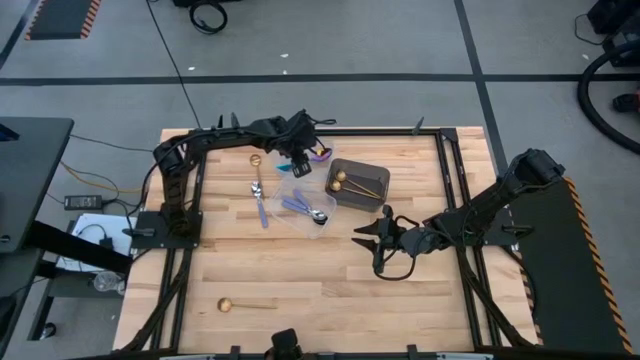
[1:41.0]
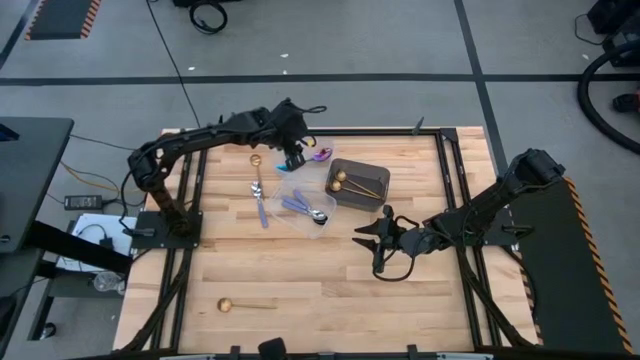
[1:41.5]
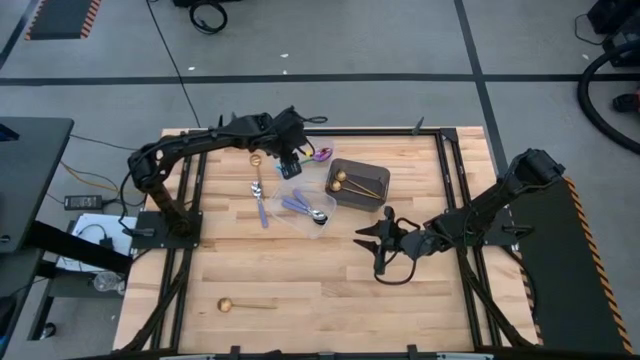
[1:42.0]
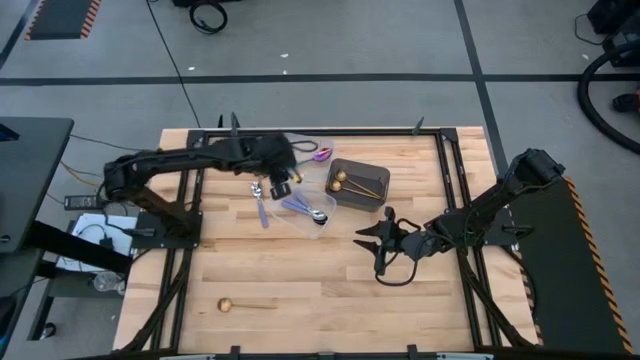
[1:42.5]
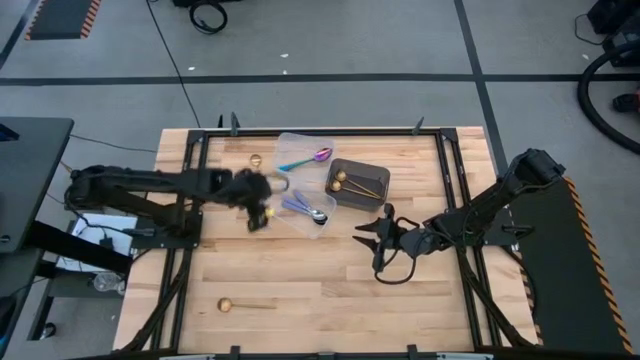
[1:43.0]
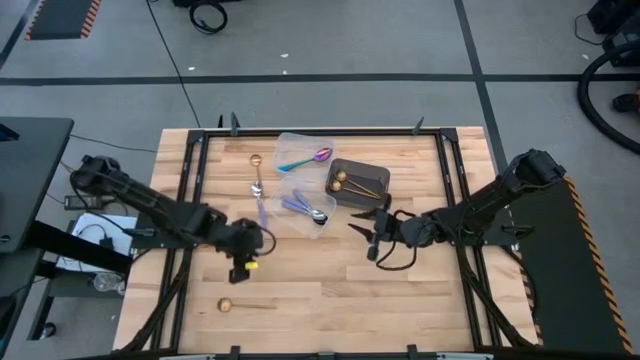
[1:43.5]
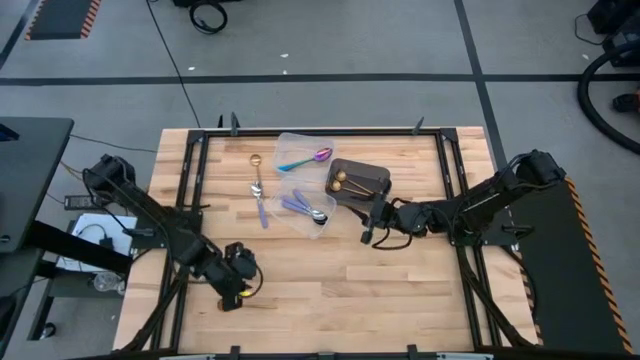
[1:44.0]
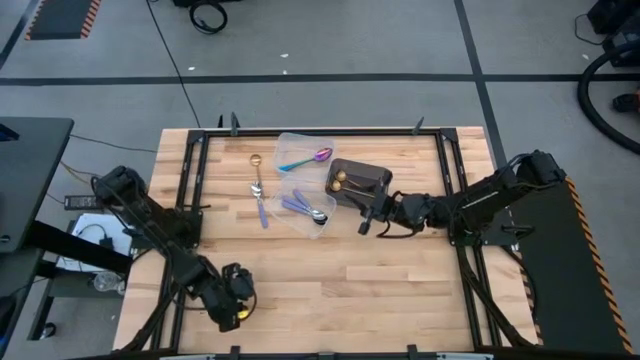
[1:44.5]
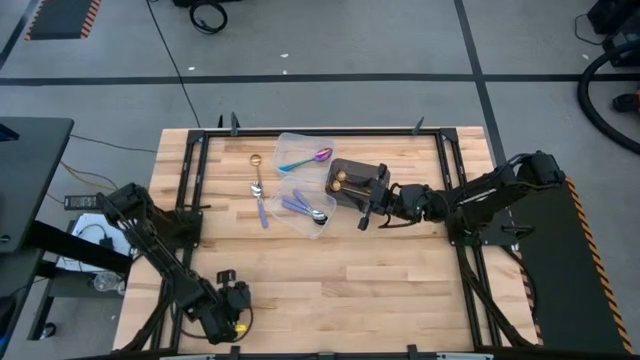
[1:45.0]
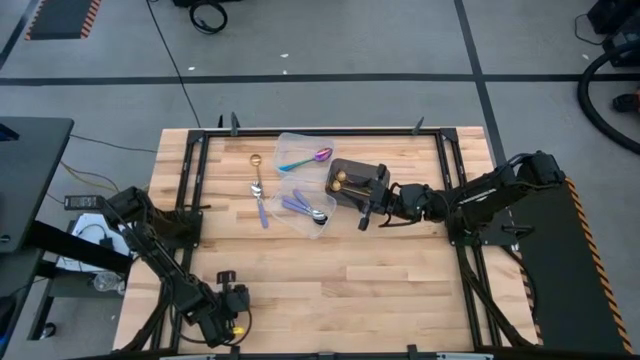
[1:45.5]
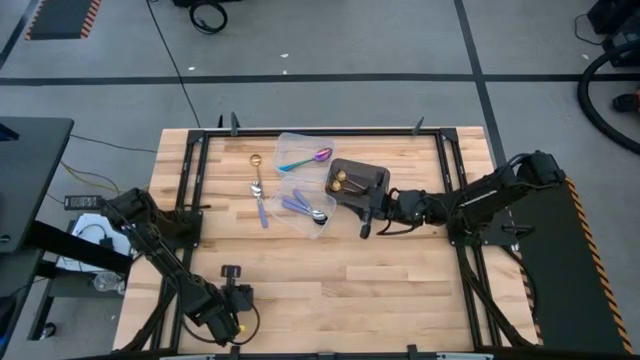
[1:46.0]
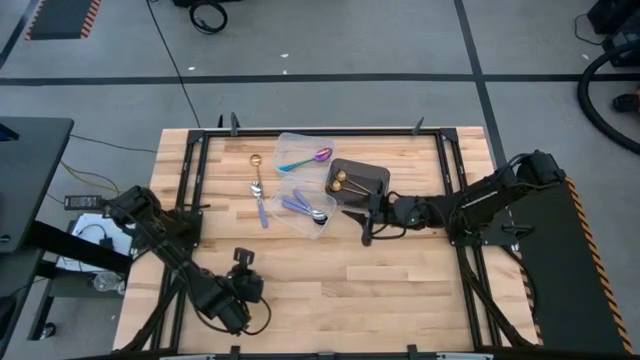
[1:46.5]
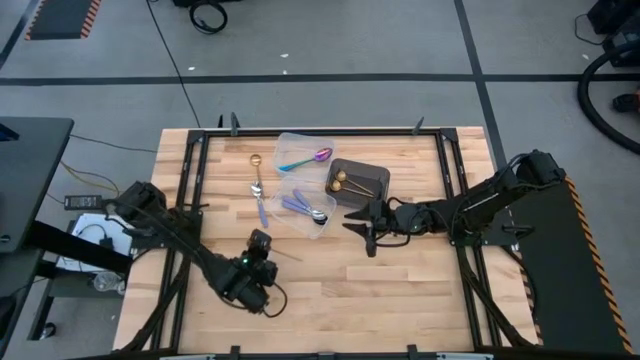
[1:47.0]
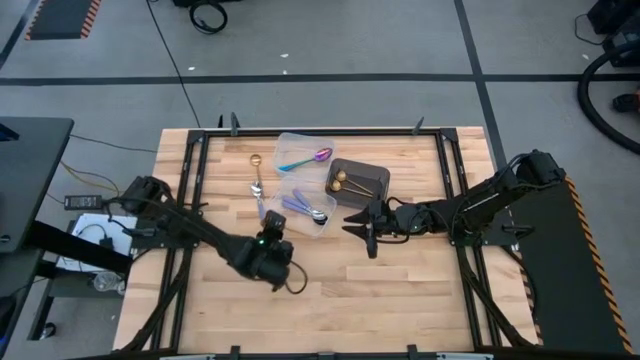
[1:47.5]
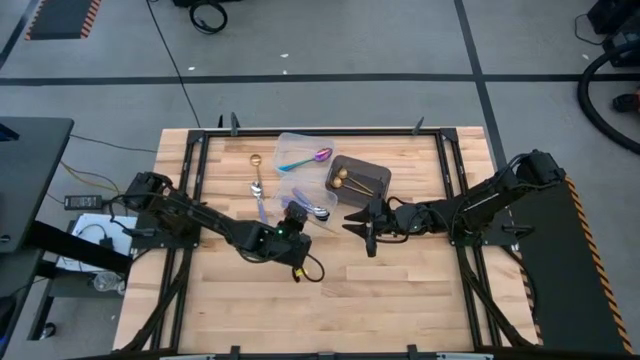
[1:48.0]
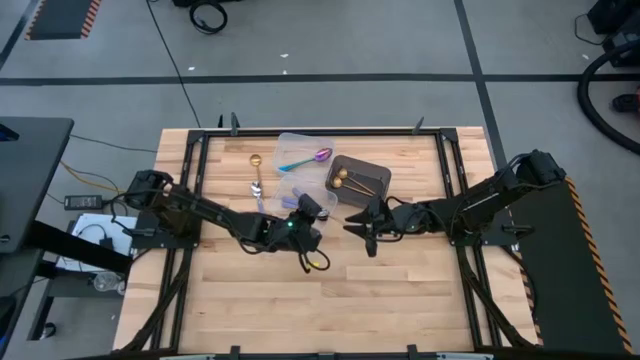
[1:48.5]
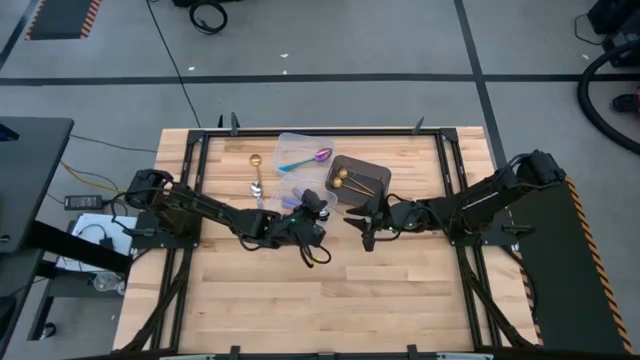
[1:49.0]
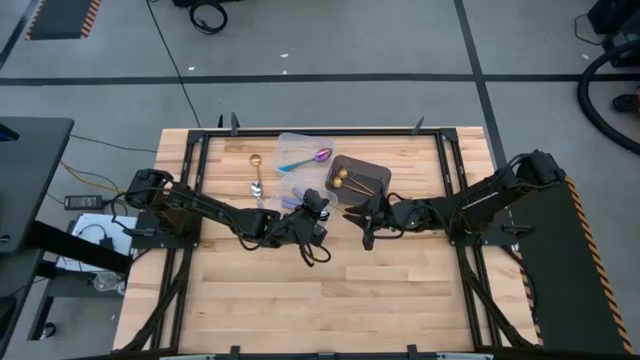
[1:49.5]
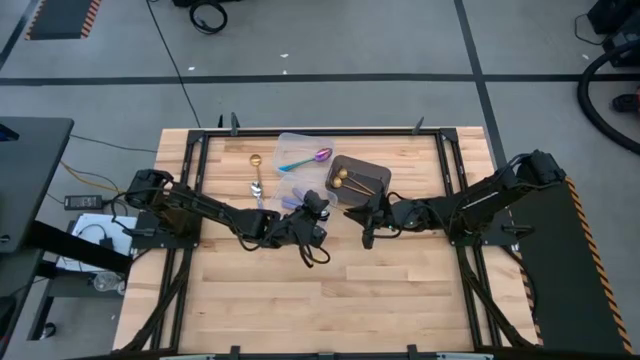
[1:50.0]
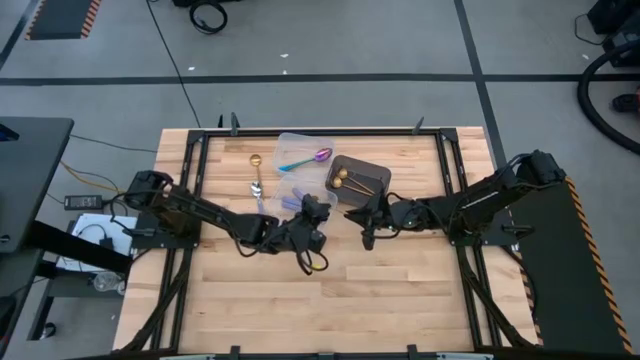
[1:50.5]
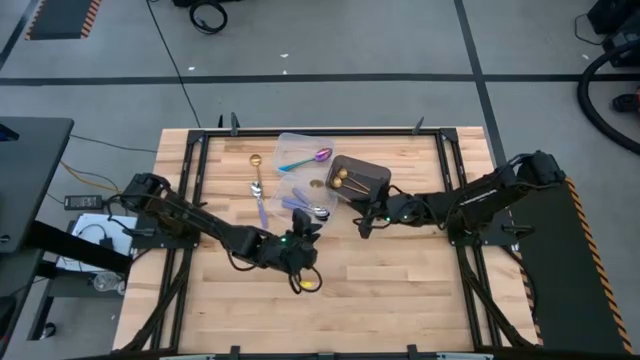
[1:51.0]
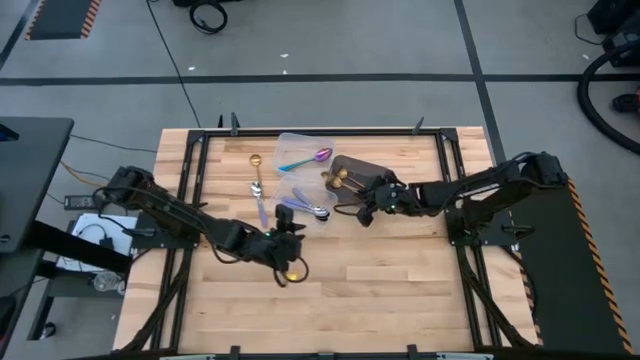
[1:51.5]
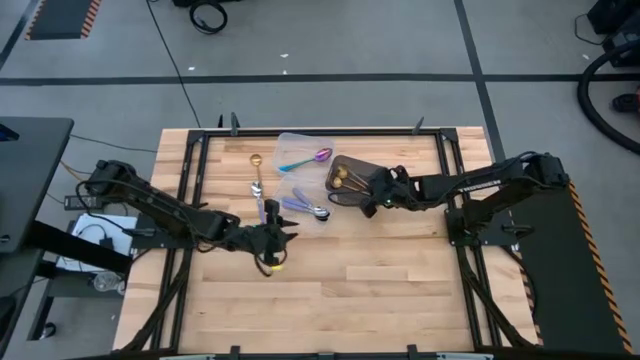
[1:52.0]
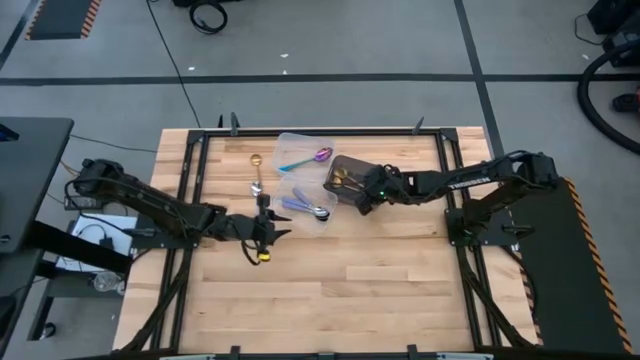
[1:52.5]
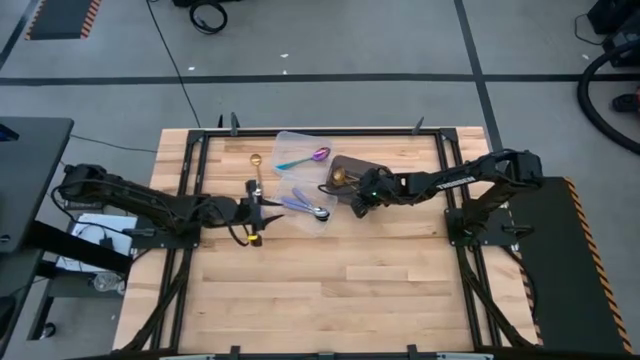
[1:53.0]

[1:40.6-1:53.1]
Task: Sort silverware by color (type)
Put the gold spoon into the black bin

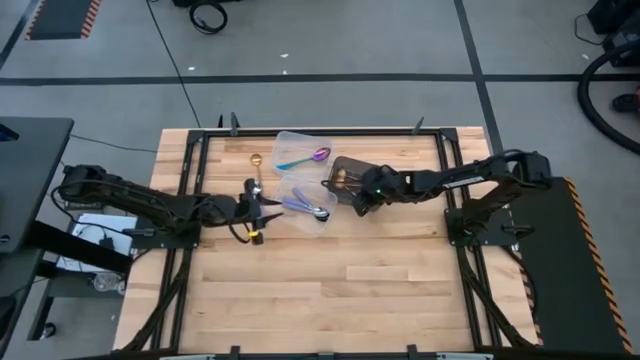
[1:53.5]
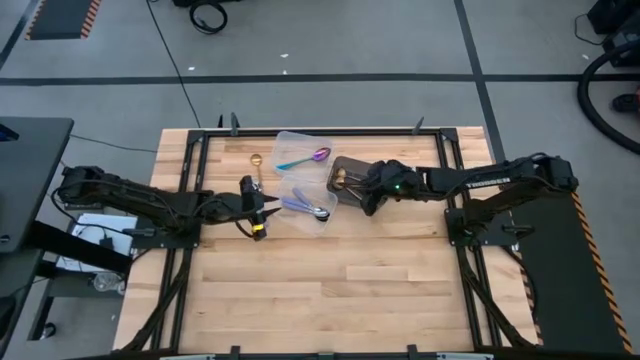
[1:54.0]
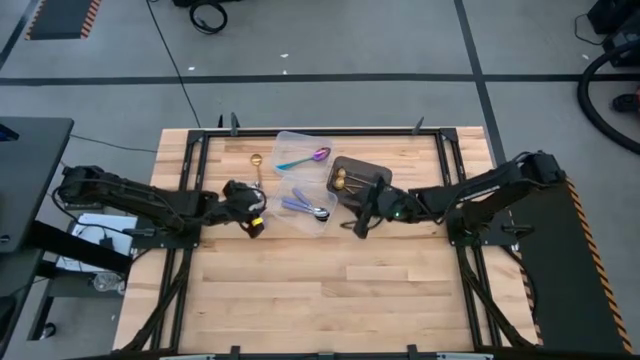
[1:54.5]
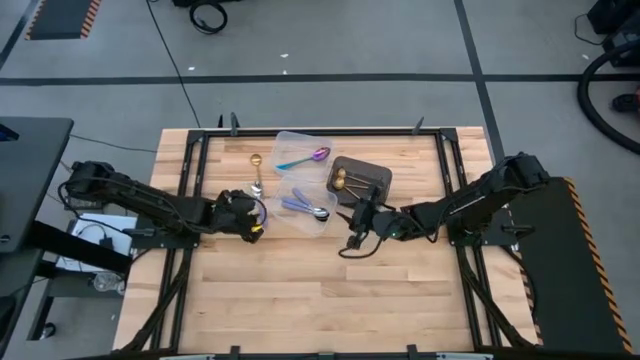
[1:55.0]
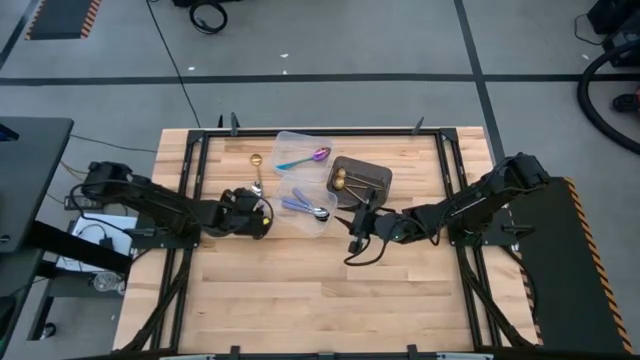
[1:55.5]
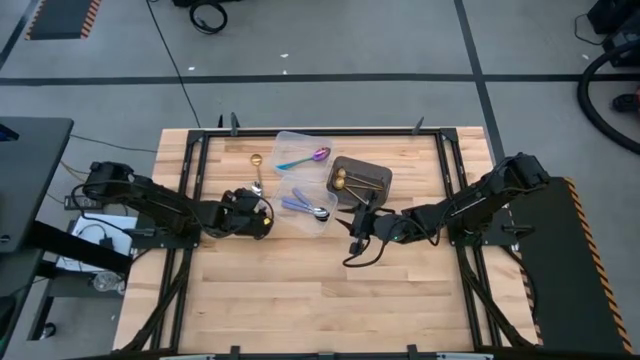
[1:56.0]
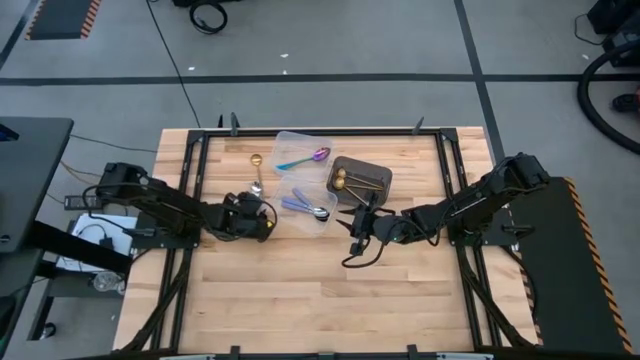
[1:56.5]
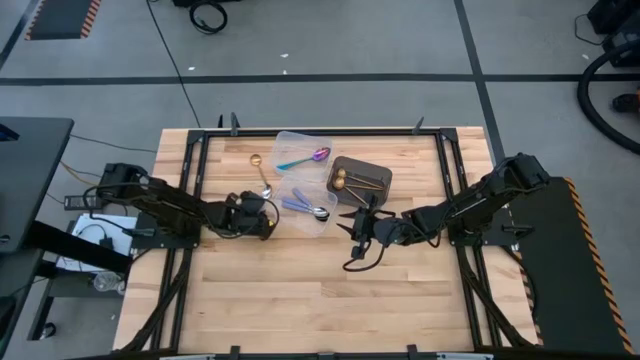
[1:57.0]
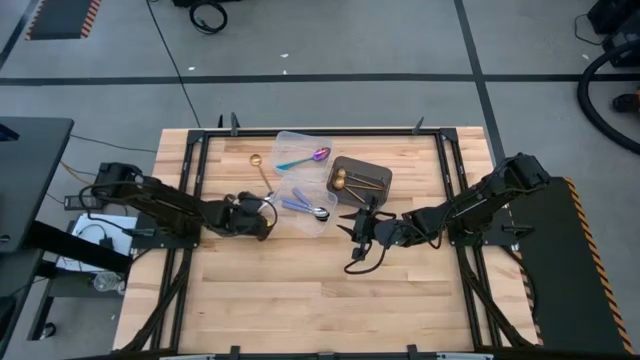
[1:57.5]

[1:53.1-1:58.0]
Put the purple spoon into the bottom transparent bin

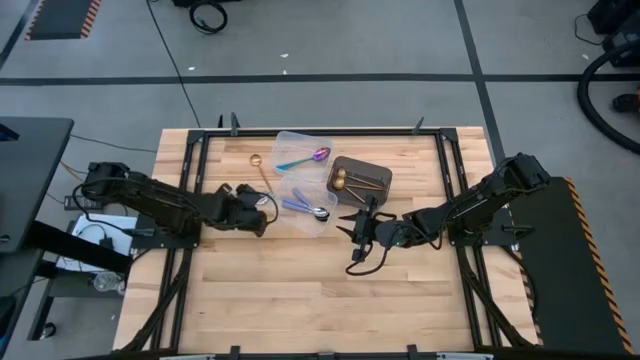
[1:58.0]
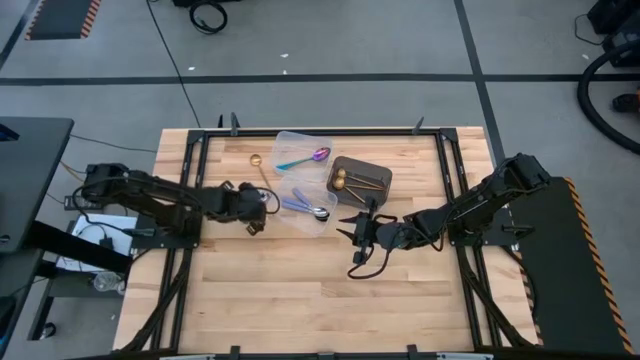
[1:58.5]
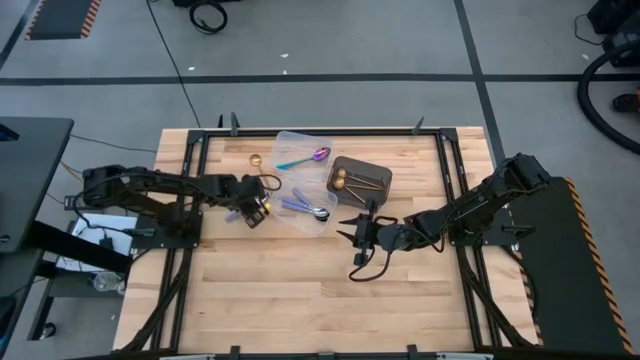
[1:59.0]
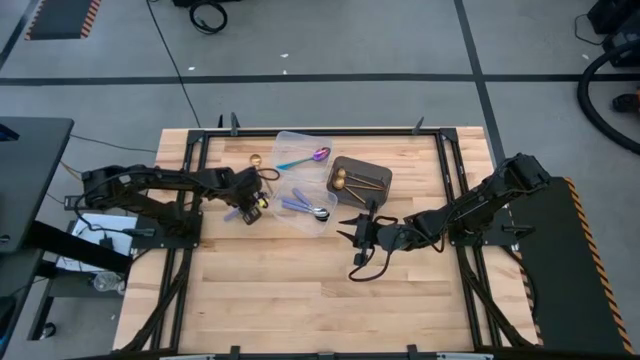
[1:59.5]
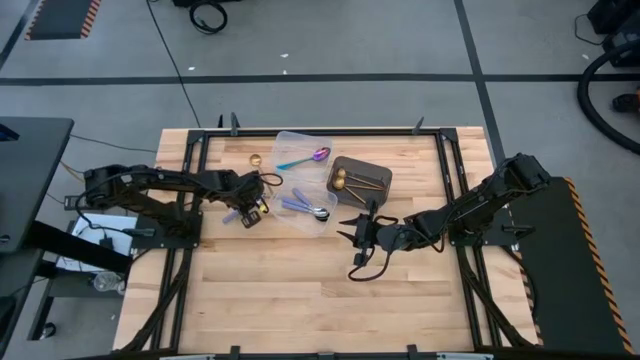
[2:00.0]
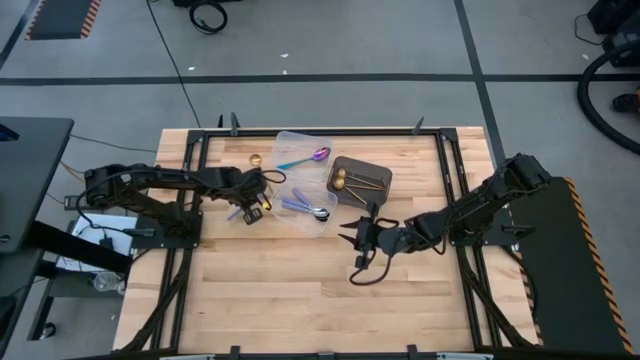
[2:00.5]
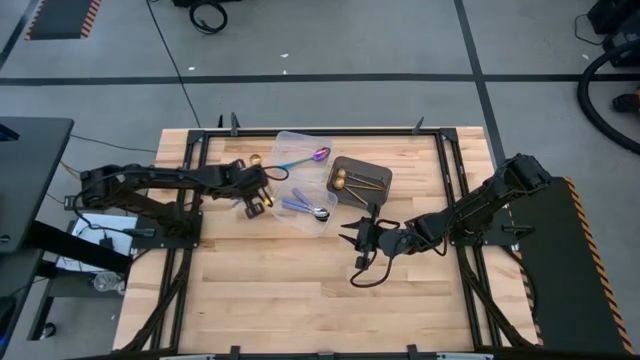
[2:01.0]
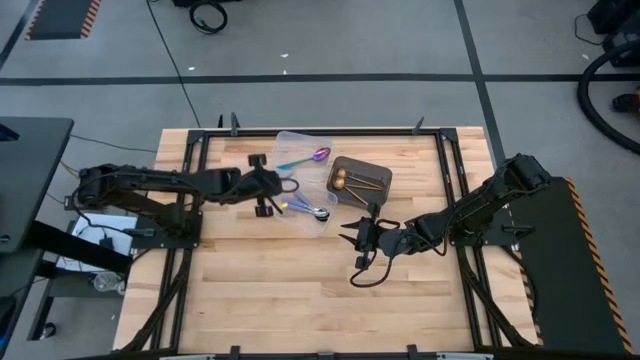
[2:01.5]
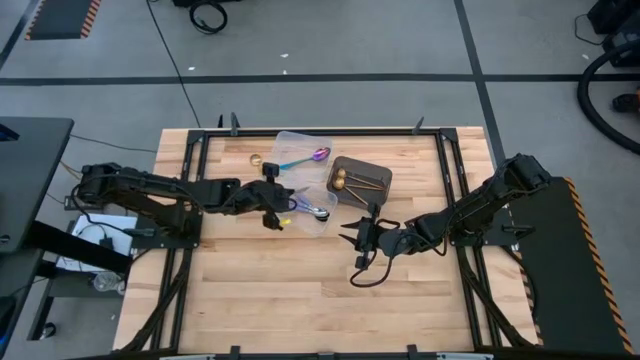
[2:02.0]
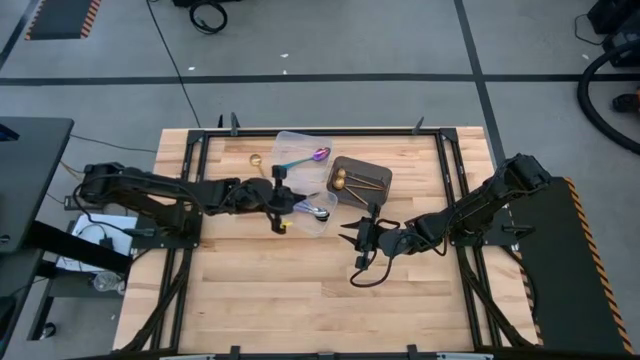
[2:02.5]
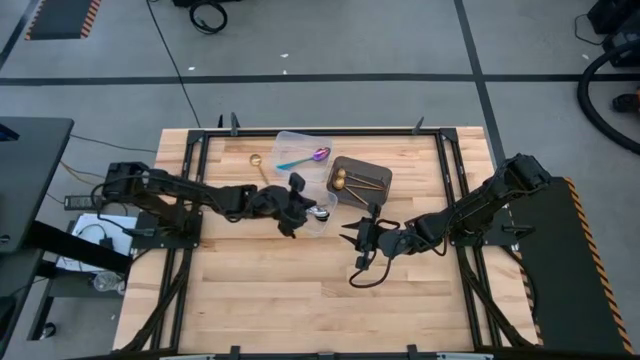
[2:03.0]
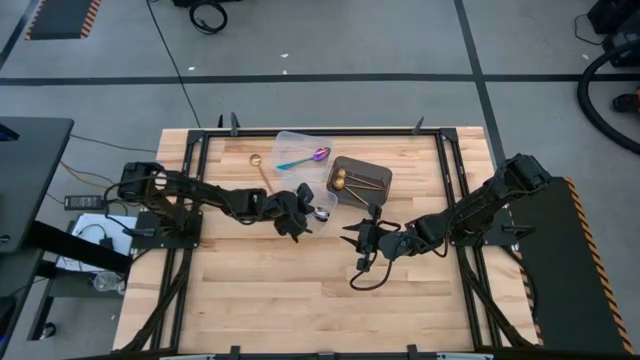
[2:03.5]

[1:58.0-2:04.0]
Put the purple spoon into the bottom transparent bin
